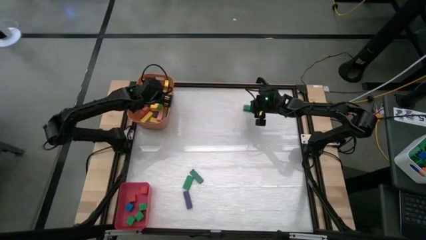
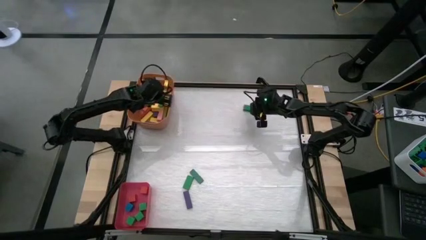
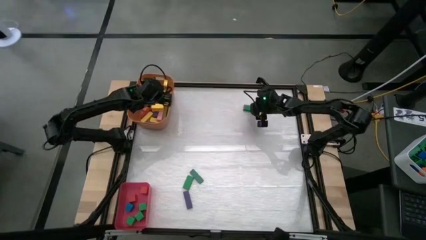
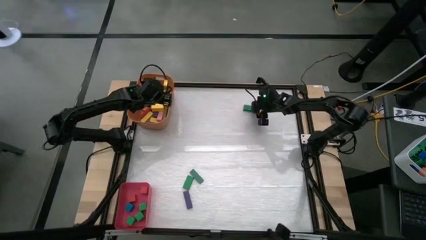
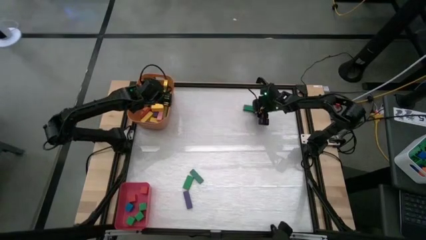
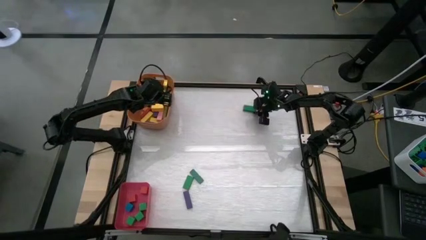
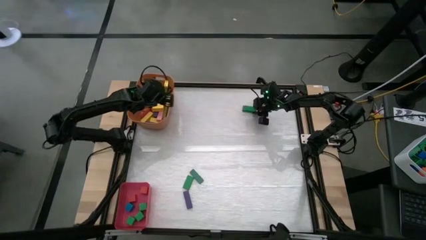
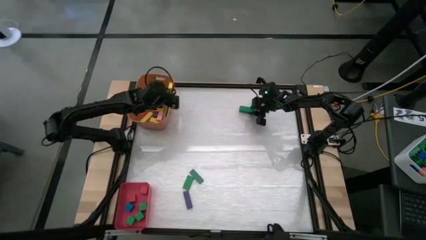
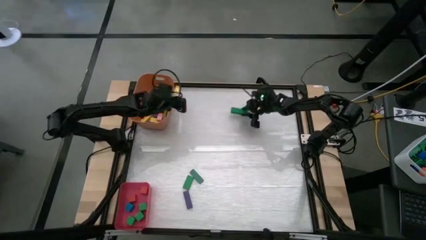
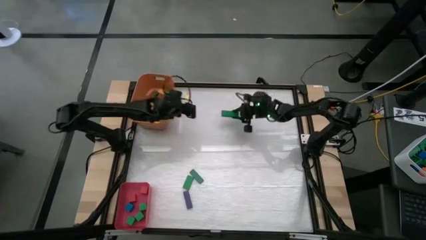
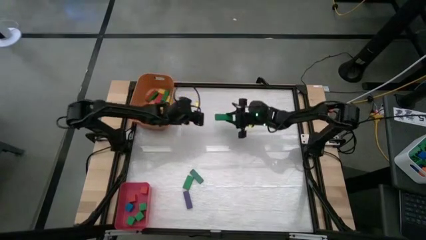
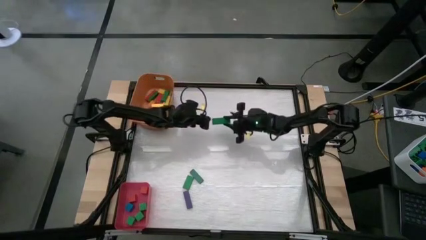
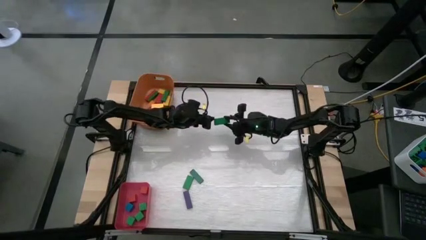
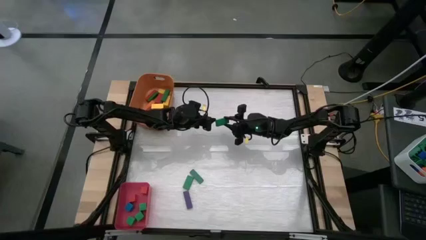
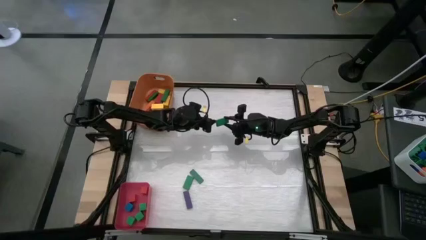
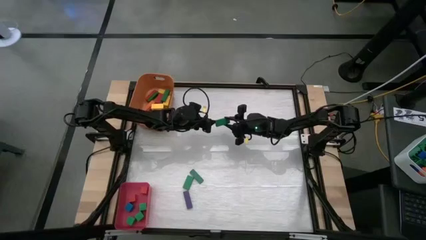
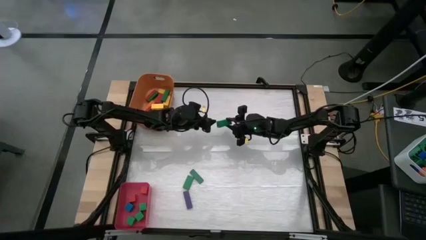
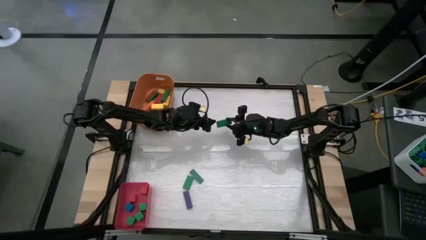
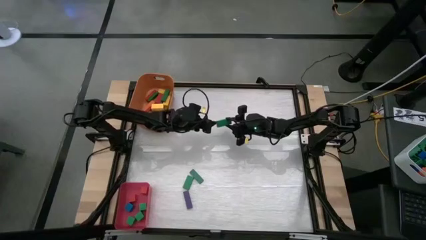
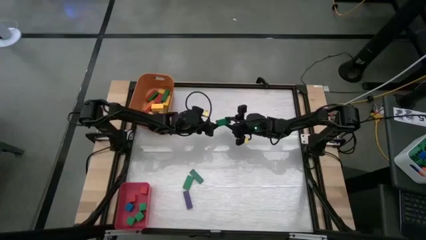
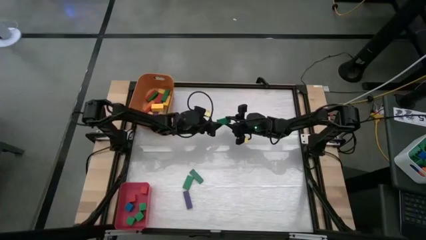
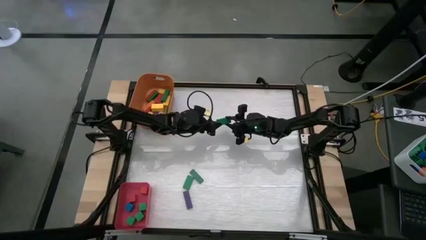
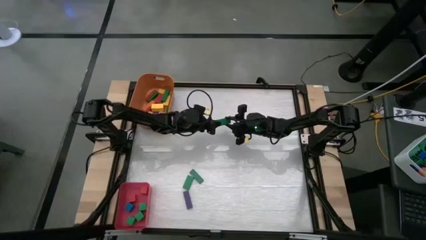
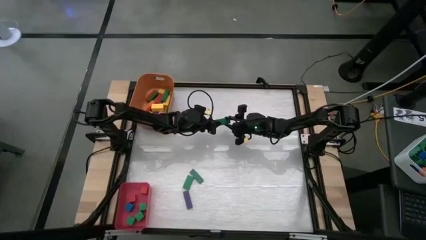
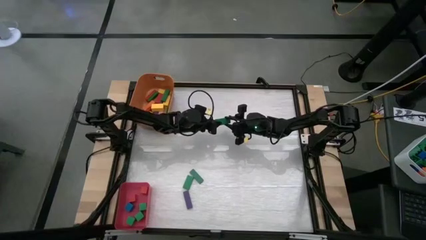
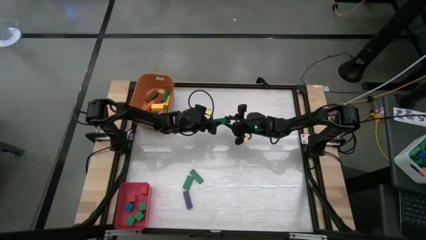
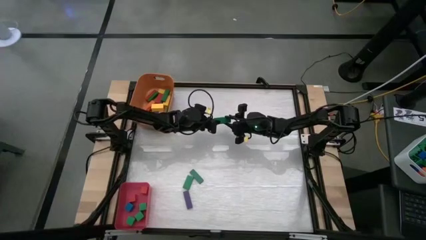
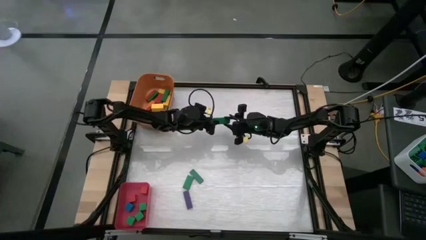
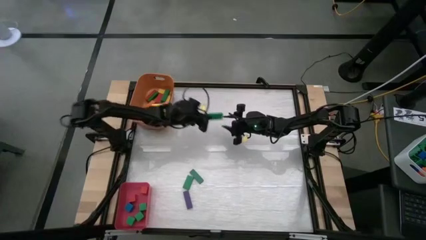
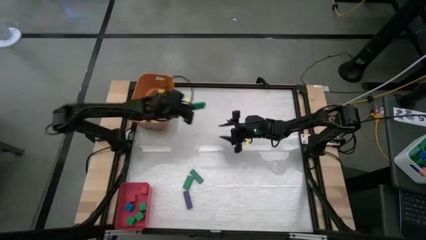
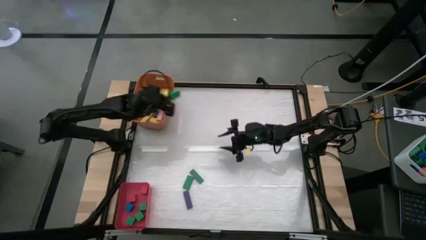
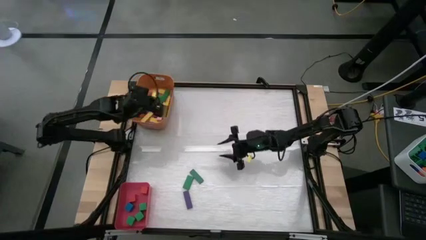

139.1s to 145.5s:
Task: Sort blocks by size
Put the big green block into the orange bin

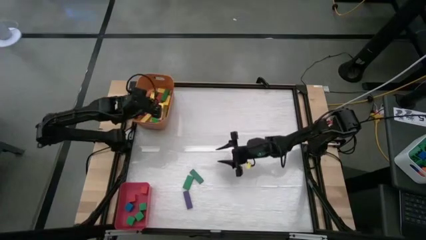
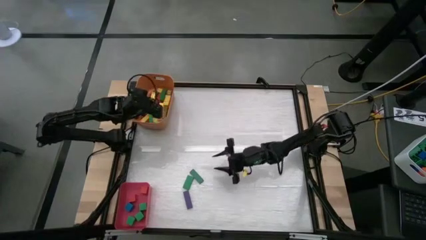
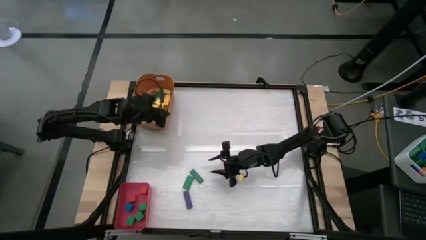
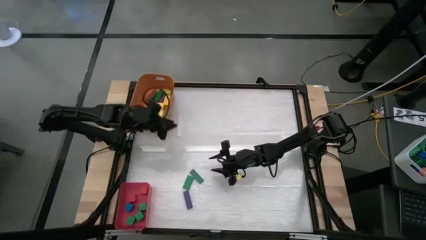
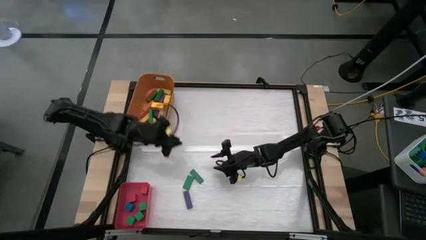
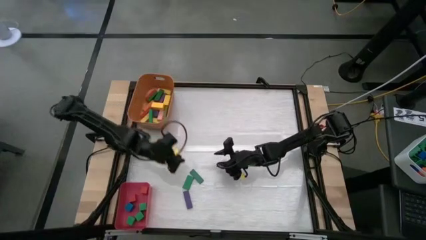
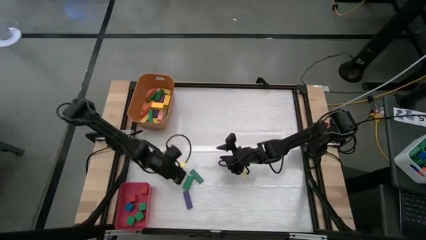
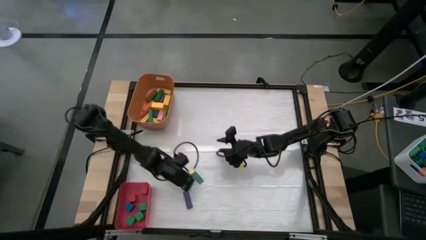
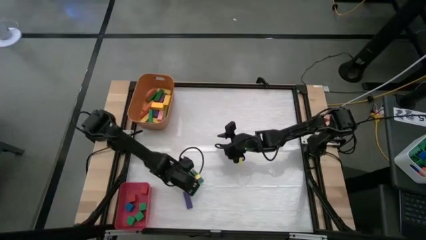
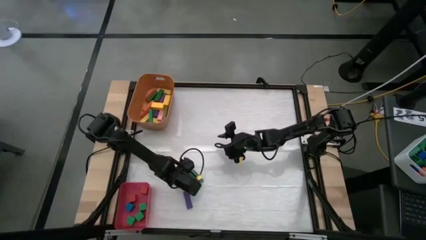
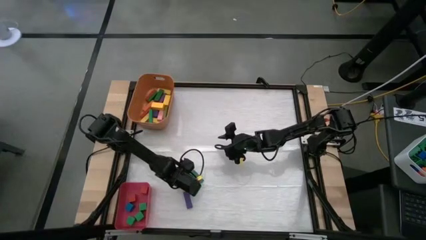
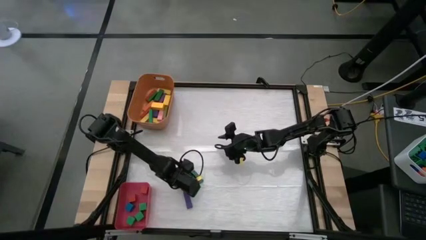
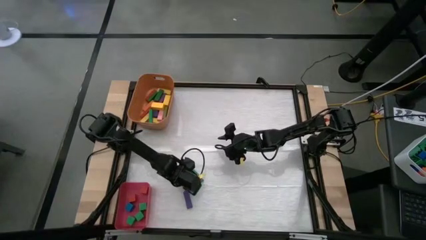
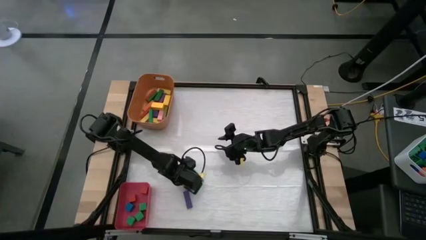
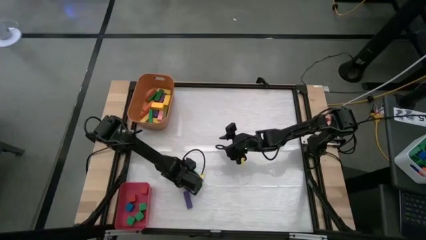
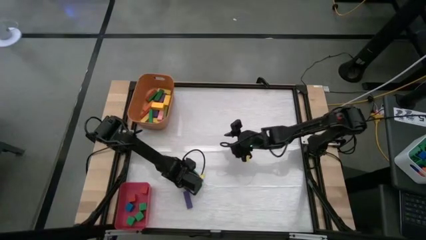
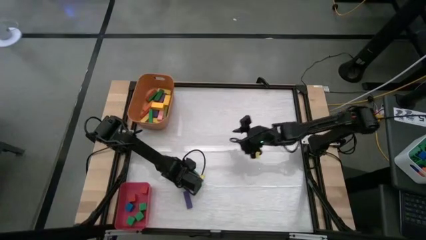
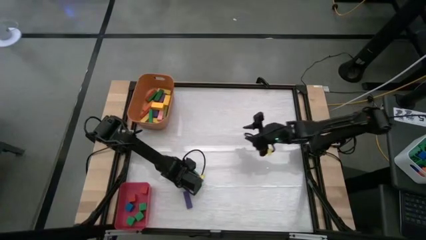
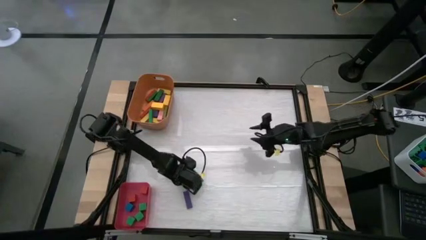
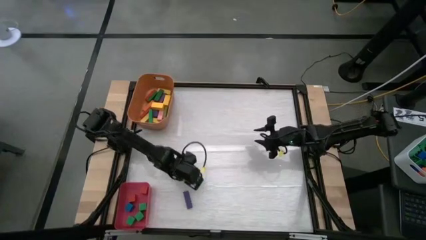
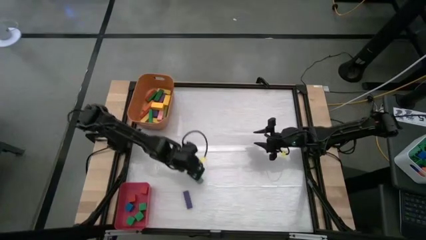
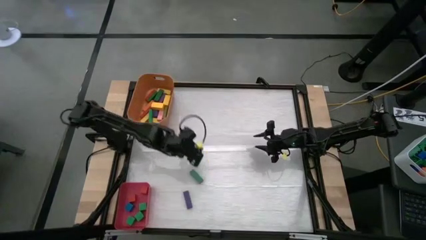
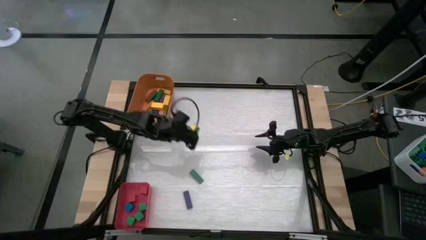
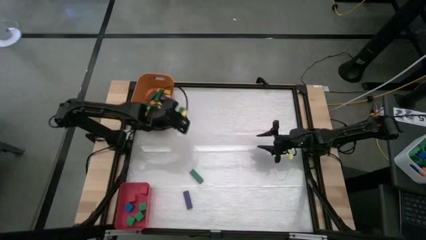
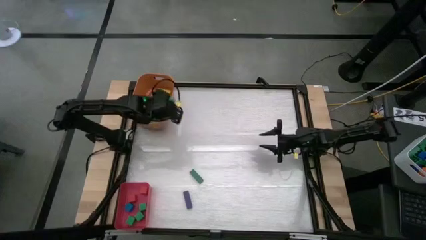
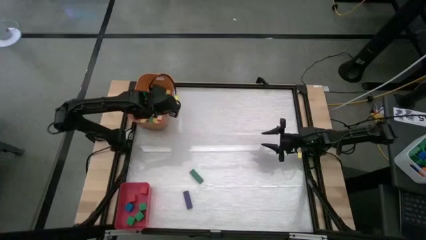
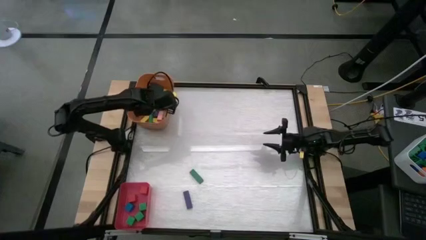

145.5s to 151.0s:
Put the big green block into the orange bin

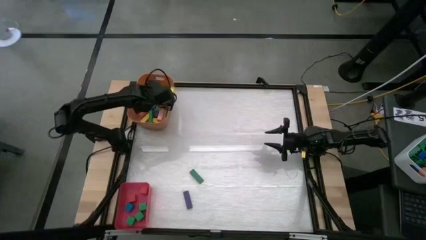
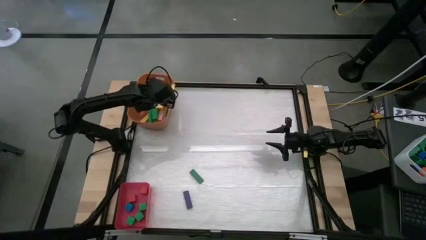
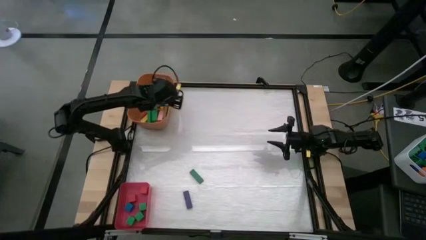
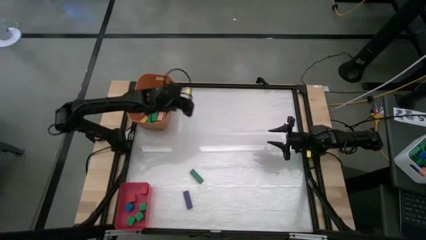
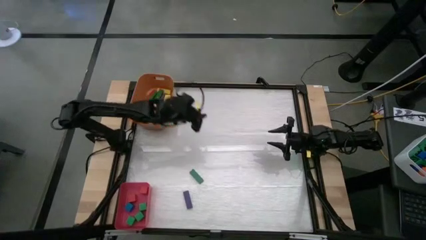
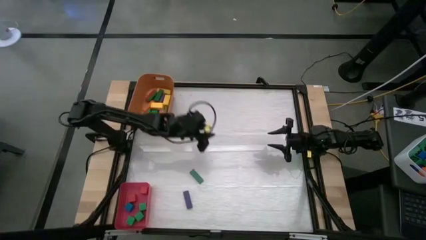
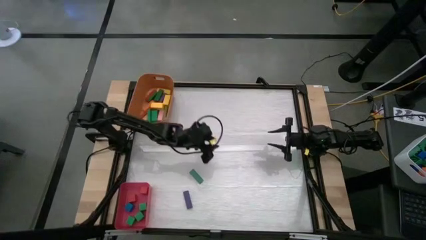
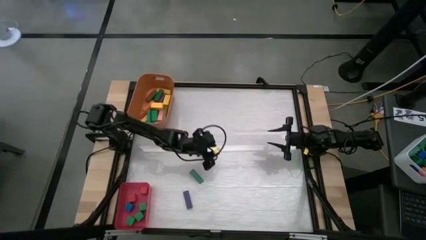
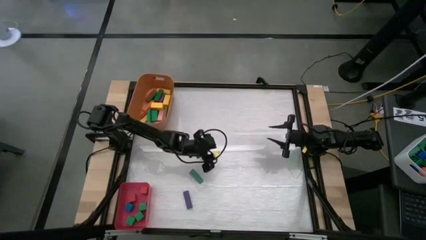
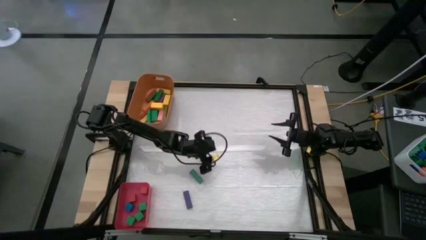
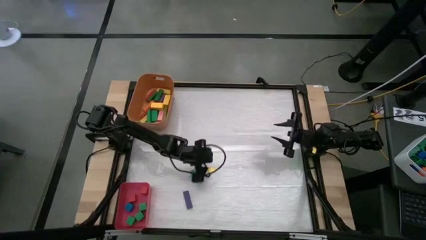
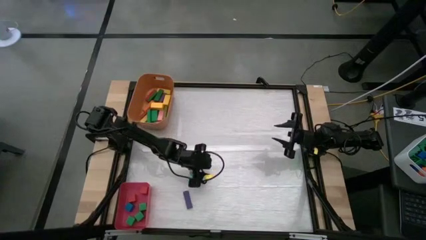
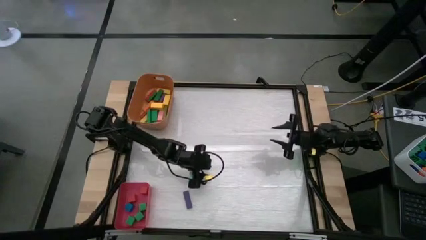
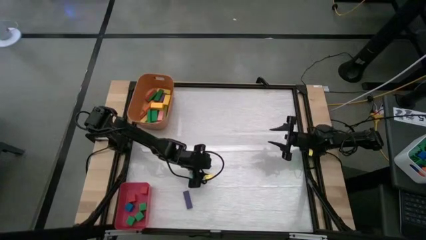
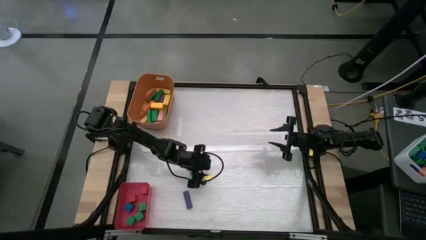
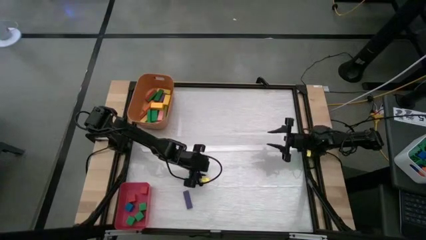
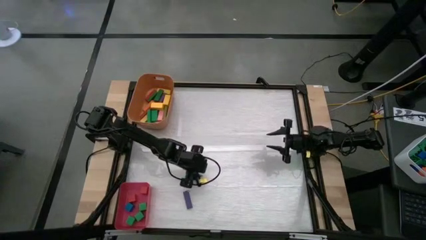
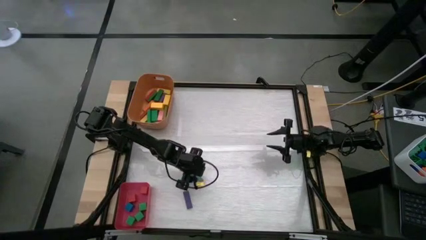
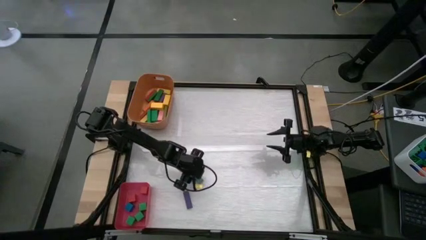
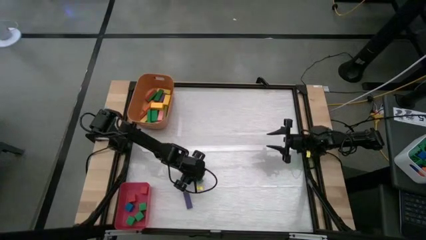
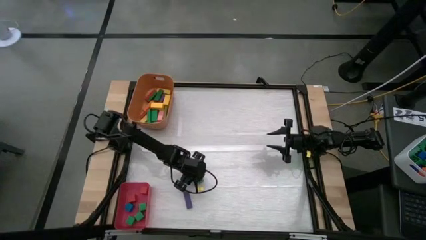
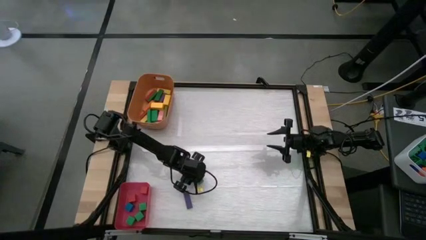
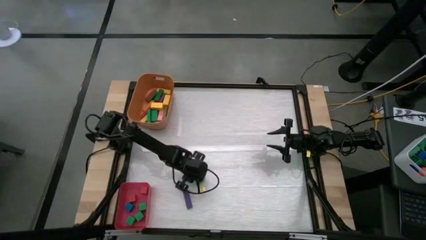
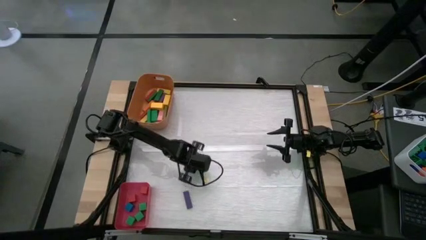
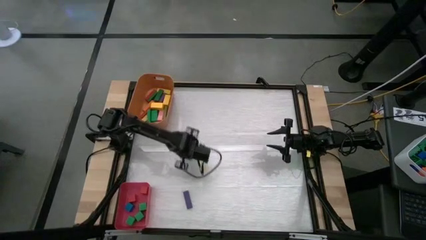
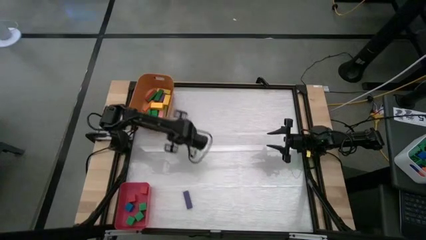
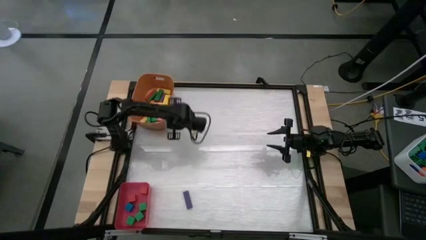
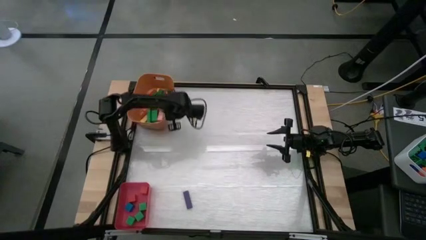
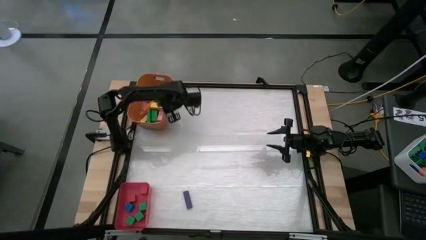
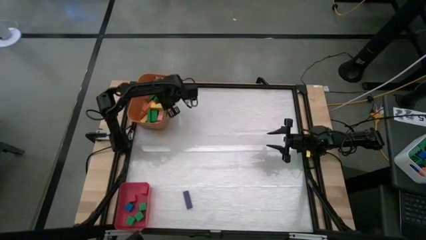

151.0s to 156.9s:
Put the big green block into the orange bin
